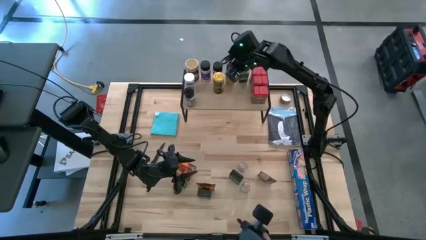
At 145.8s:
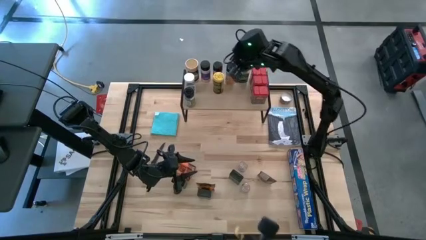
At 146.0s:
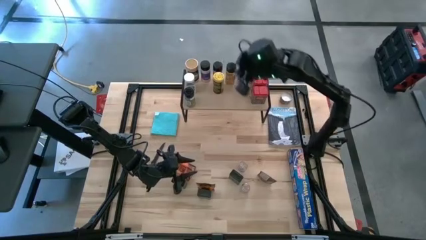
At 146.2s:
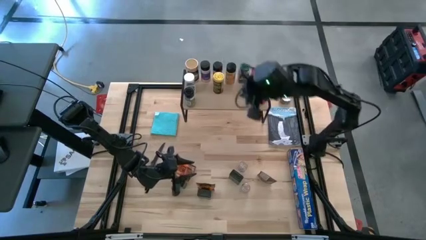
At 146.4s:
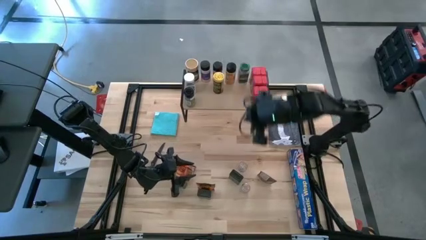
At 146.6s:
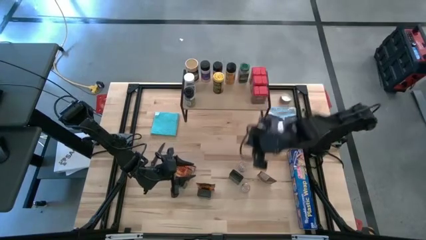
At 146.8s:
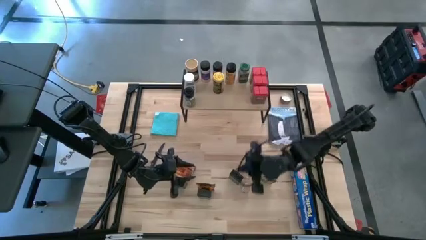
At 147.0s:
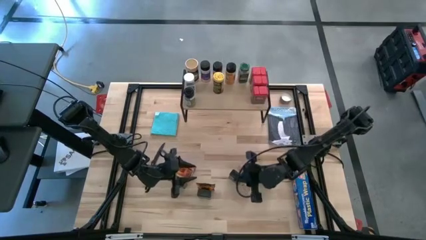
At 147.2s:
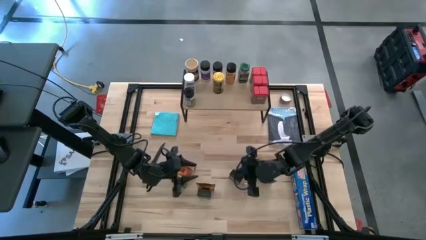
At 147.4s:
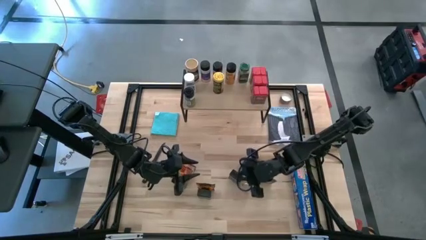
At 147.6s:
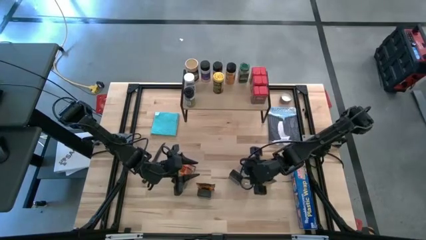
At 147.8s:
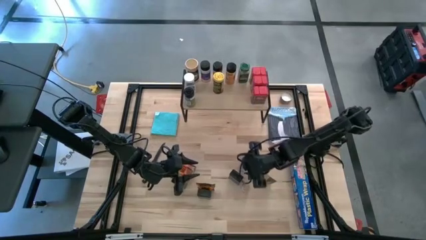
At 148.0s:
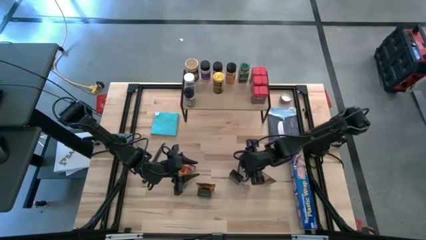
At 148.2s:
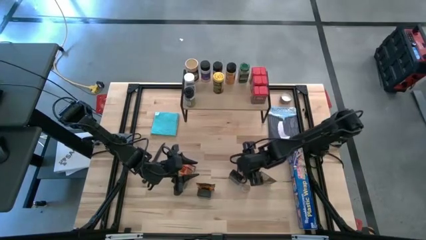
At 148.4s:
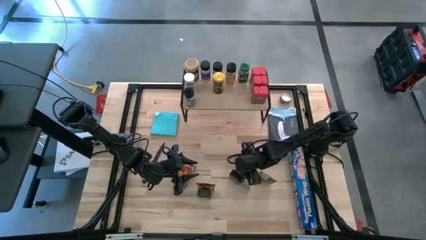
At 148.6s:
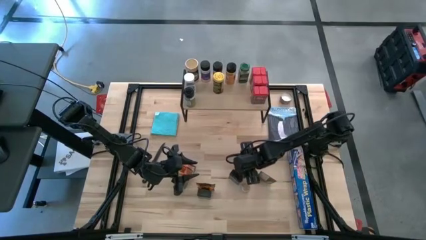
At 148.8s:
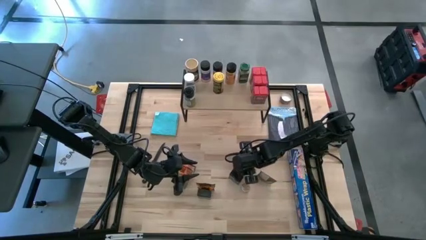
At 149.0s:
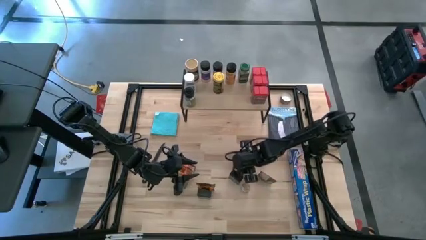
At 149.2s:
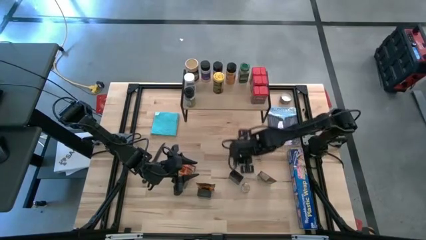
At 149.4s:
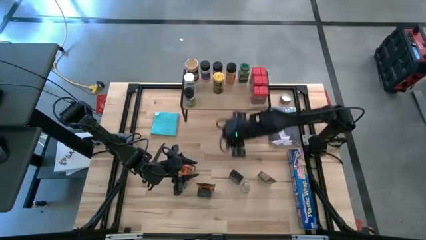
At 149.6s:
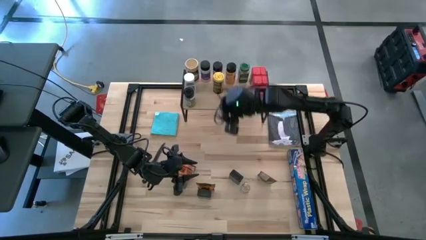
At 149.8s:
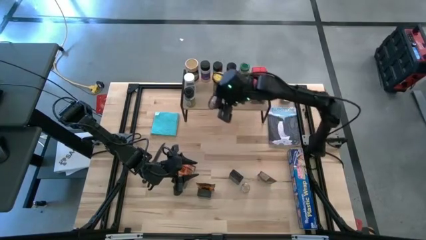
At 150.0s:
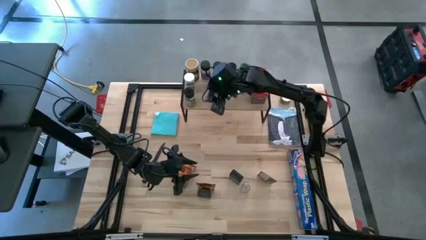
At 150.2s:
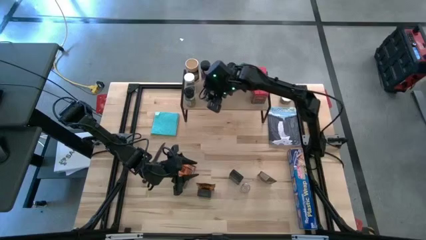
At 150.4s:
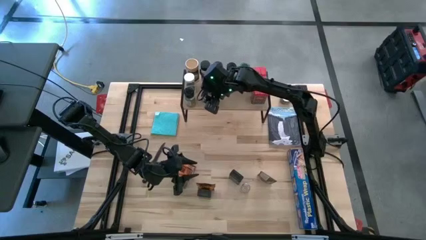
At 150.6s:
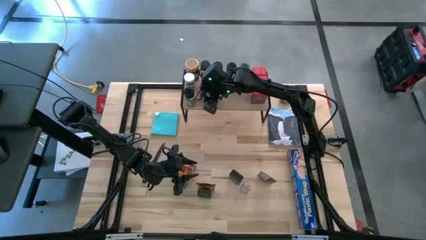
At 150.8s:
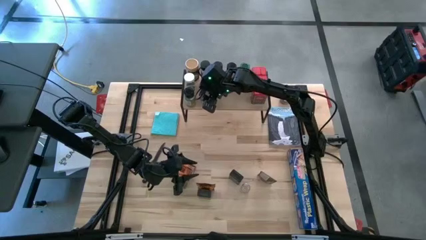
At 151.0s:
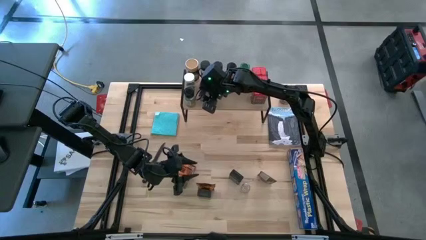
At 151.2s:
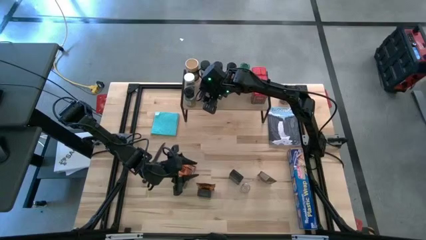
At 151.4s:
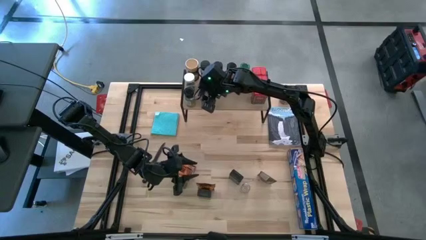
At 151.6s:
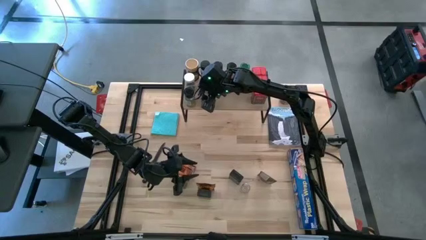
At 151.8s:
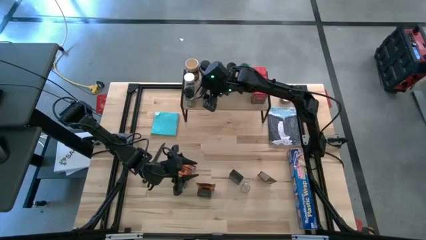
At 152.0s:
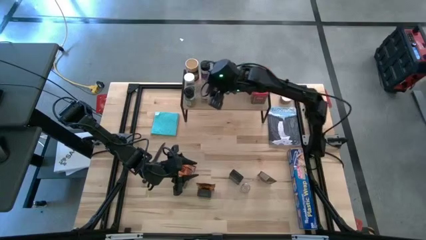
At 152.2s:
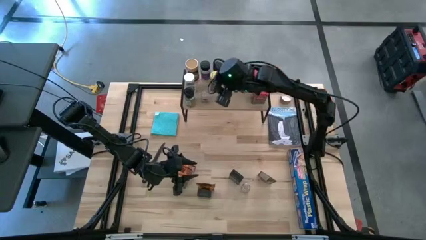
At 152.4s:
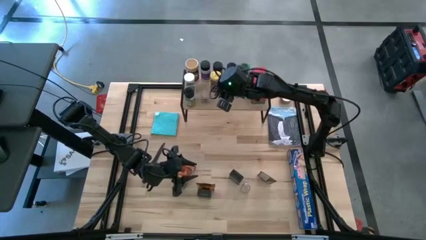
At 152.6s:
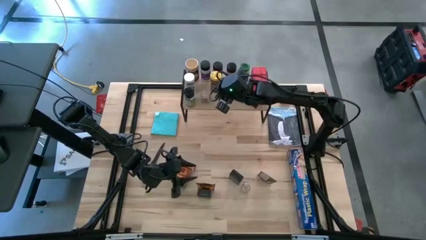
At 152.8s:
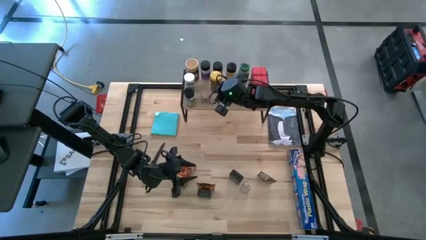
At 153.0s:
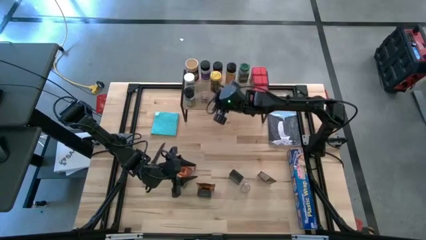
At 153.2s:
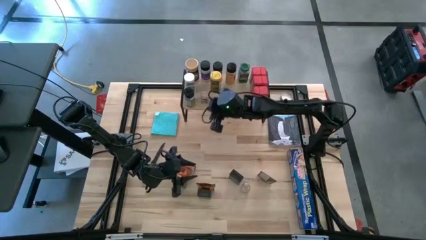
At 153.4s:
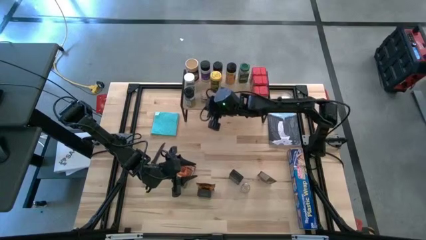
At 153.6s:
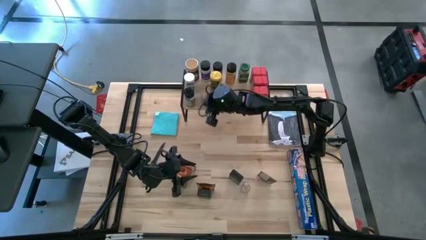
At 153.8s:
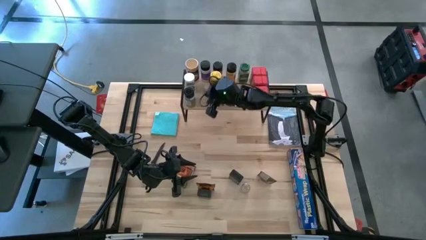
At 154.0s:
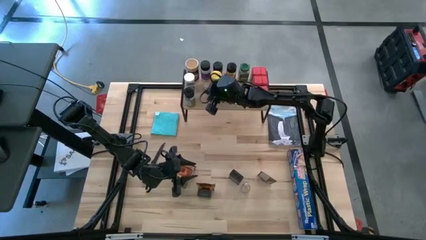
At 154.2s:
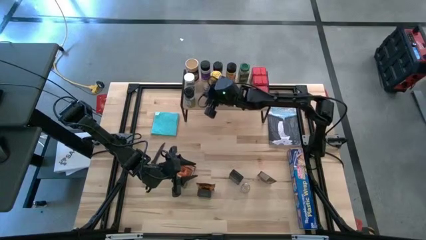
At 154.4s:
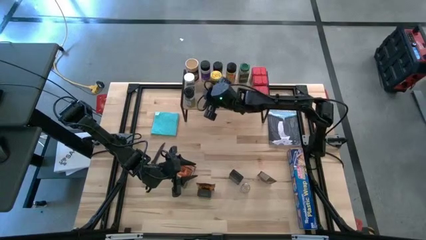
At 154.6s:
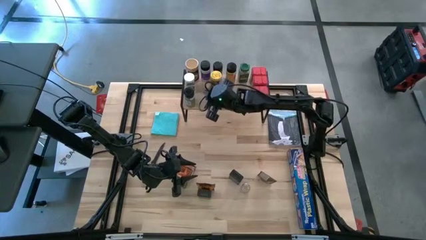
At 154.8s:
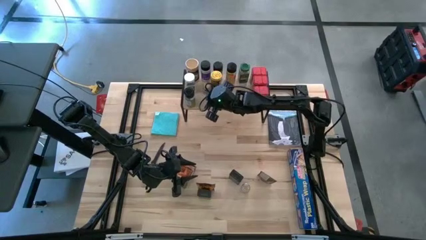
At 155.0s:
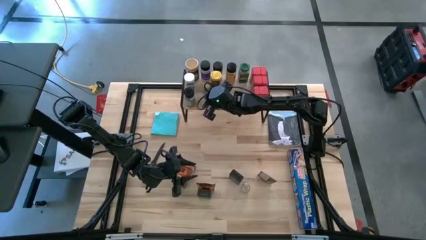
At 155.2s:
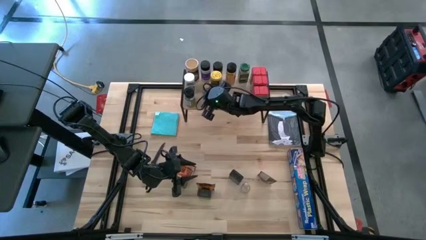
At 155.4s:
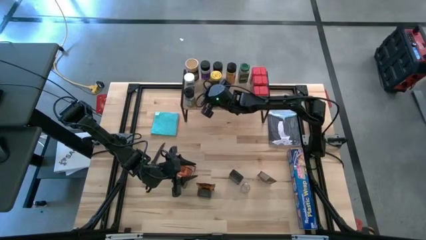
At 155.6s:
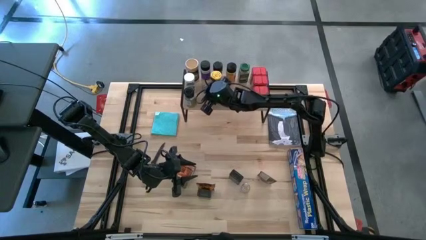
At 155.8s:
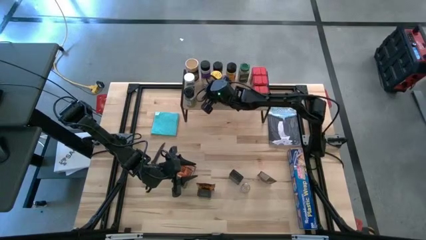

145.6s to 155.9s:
Task: Shelf spices
Put the brown seasoning bottle on the shelf

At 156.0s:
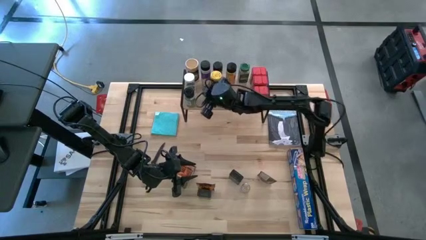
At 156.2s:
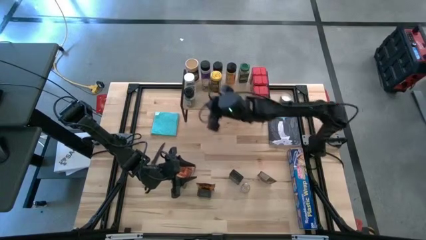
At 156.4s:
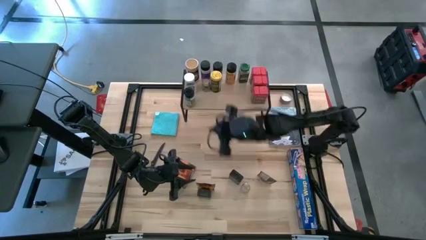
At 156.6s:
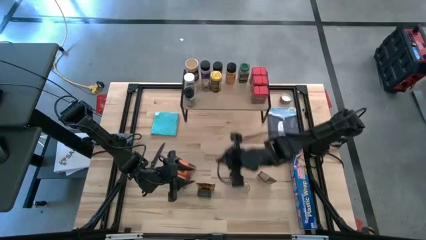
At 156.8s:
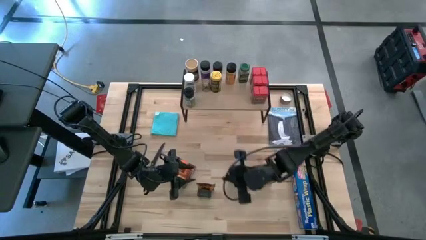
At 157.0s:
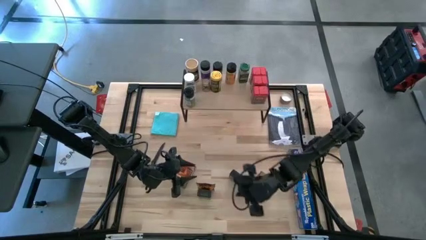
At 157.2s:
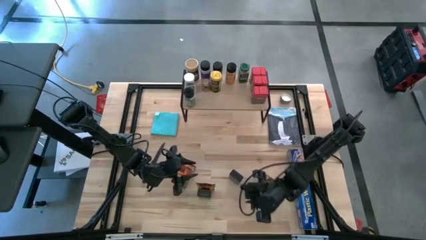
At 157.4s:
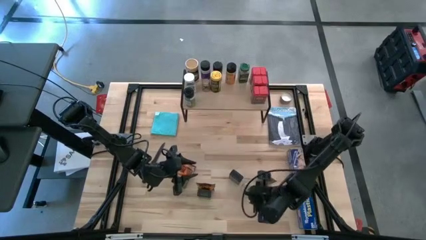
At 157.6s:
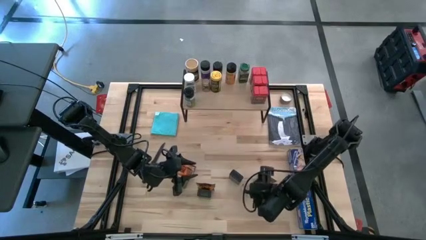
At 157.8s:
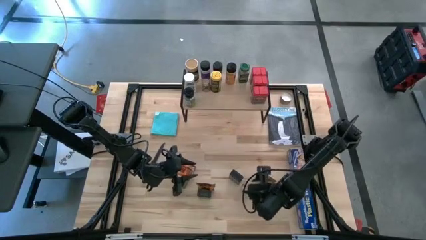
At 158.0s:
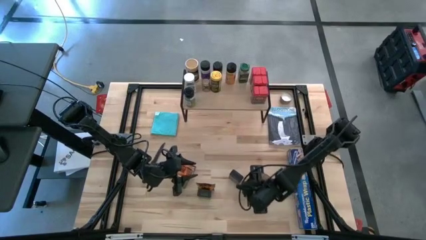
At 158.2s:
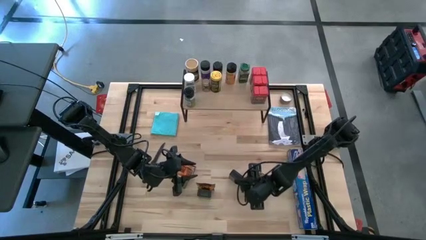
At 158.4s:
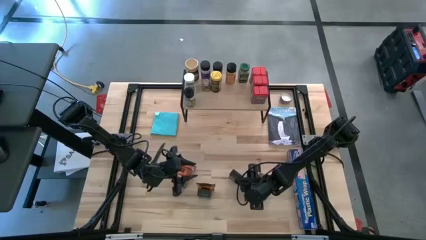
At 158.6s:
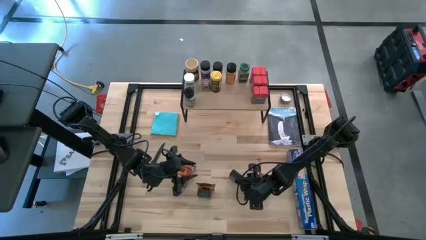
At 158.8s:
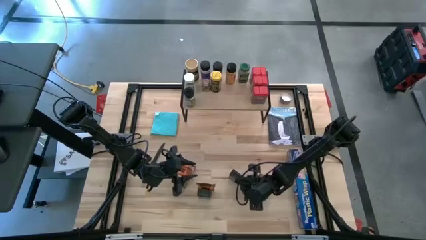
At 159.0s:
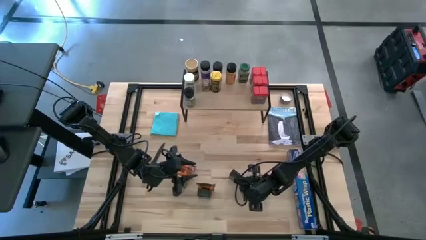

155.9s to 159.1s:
Put the brown seasoning bottle on the shelf

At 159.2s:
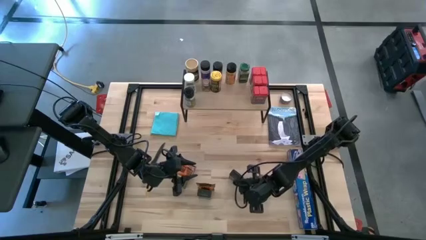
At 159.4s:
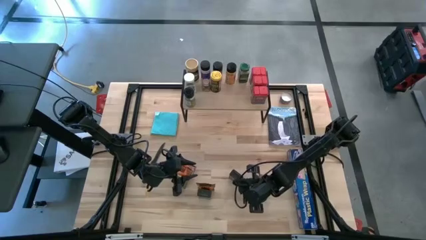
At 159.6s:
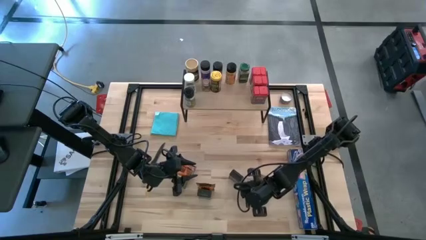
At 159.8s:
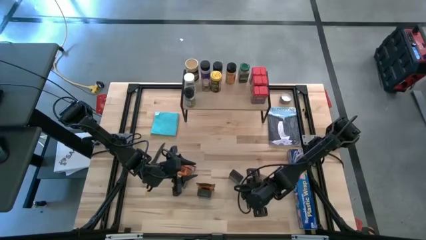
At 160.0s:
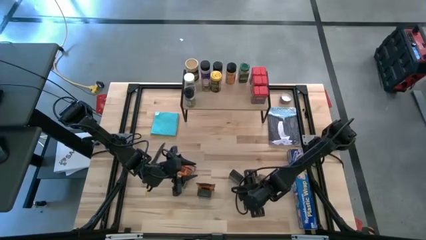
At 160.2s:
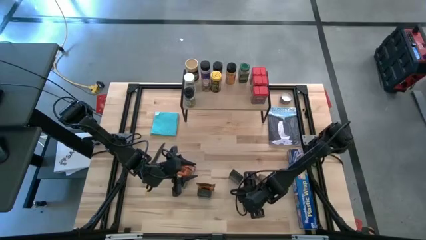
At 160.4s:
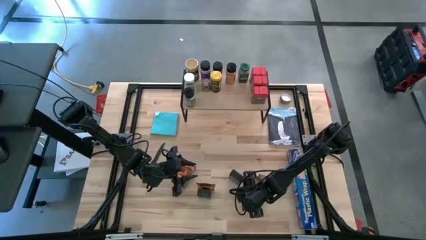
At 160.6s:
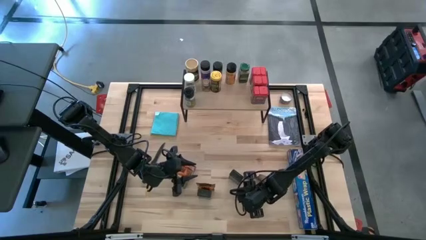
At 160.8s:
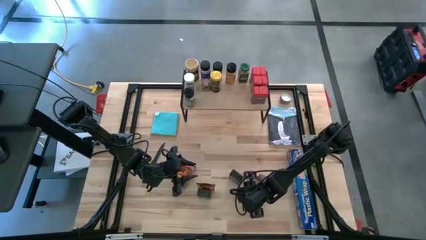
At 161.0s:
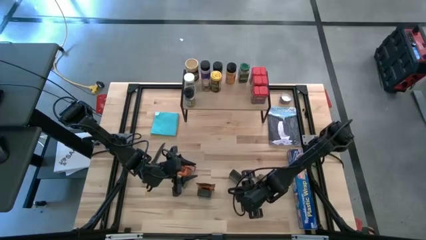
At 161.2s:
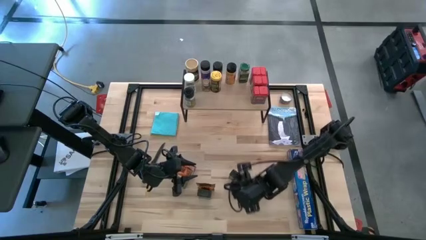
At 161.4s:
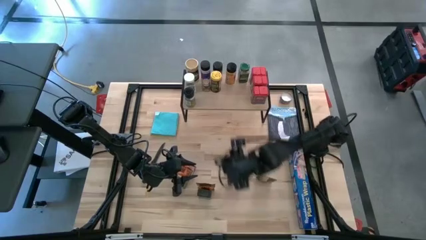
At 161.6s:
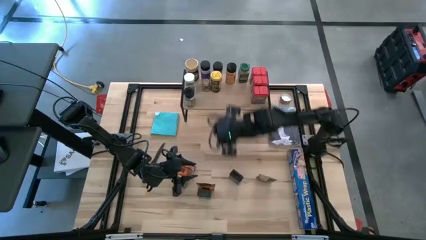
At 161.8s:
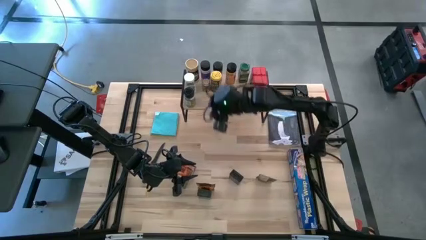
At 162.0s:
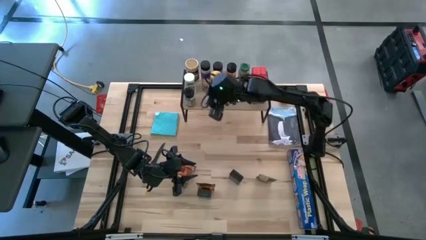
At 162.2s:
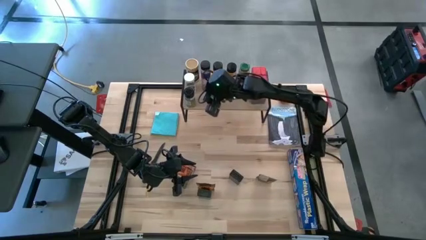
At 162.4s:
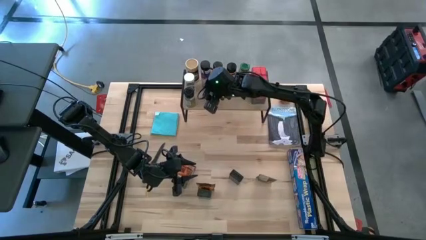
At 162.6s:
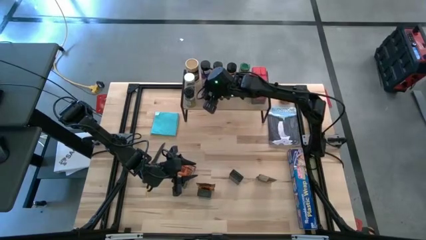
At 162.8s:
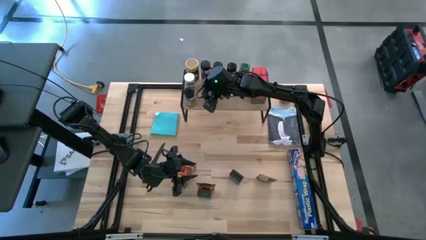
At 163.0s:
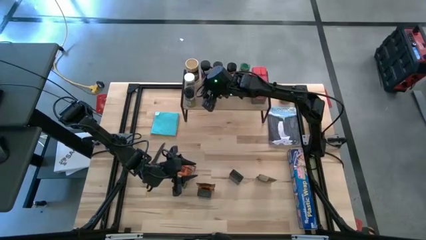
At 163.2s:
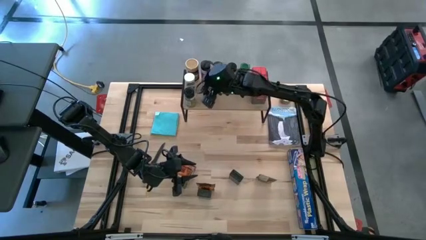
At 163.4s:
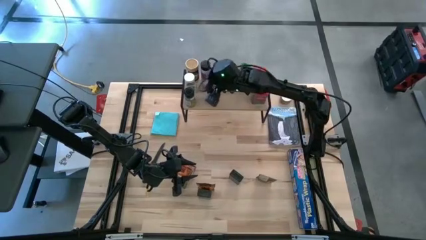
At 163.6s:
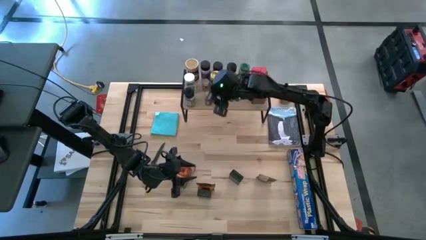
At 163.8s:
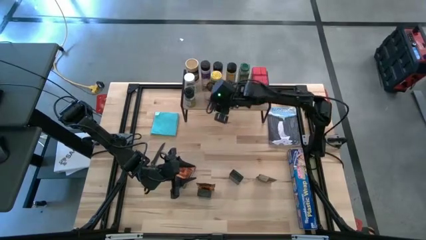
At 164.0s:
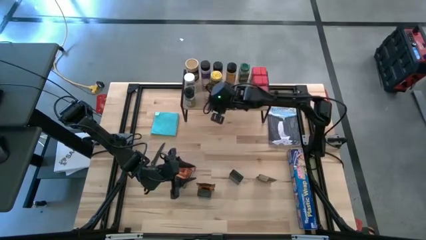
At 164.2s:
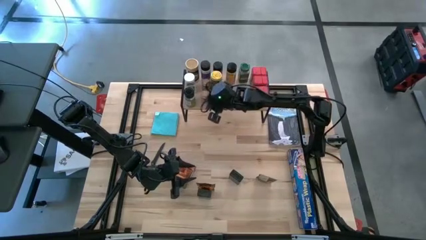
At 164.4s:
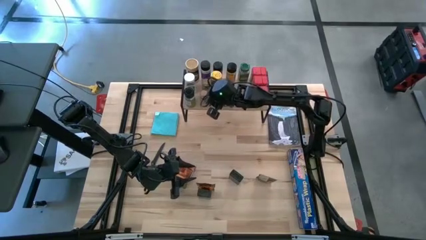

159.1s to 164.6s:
Put the brown seasoning bottle on the shelf
